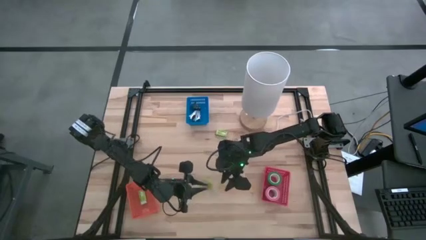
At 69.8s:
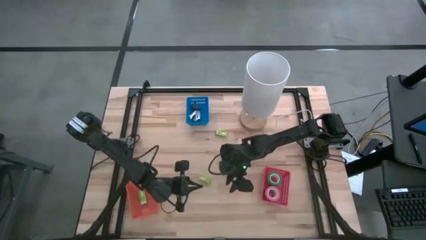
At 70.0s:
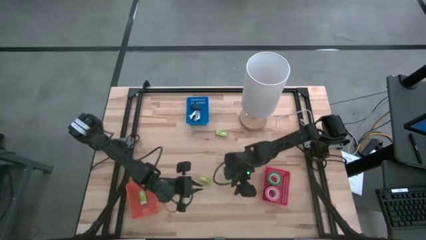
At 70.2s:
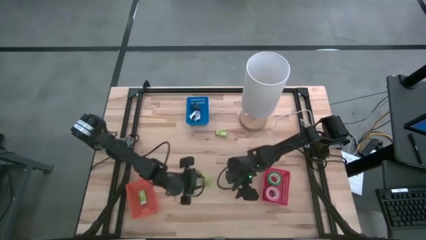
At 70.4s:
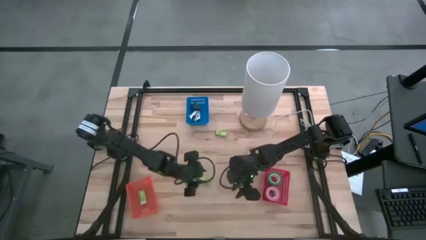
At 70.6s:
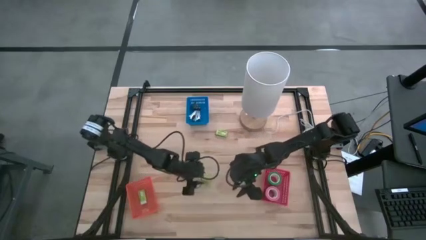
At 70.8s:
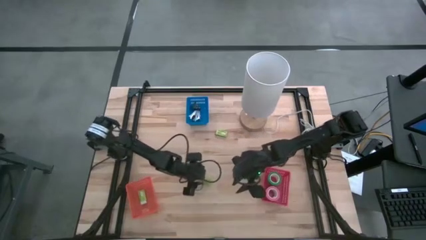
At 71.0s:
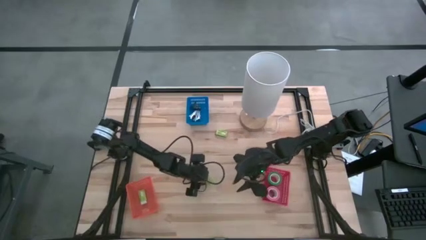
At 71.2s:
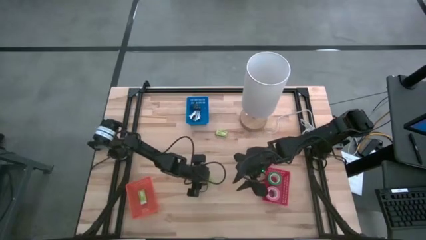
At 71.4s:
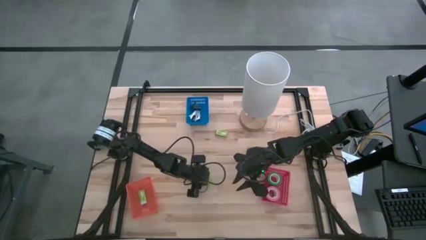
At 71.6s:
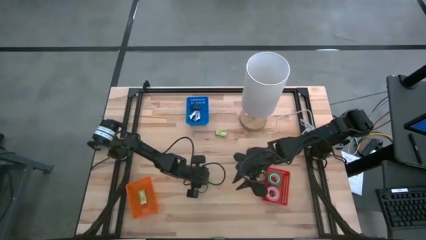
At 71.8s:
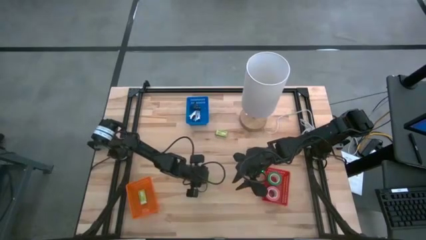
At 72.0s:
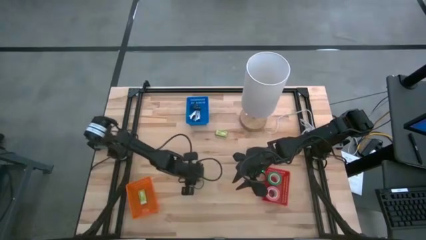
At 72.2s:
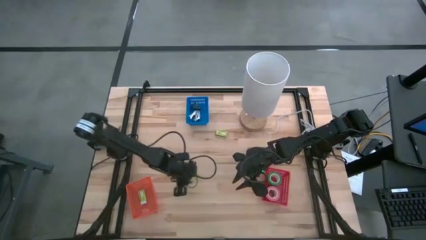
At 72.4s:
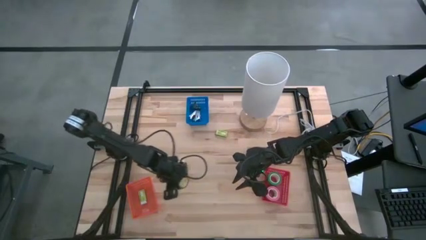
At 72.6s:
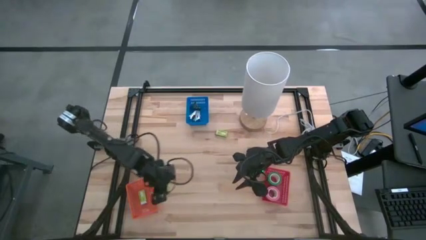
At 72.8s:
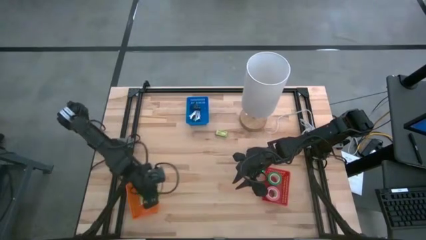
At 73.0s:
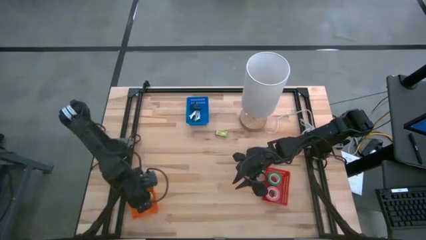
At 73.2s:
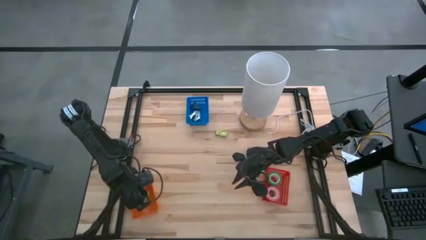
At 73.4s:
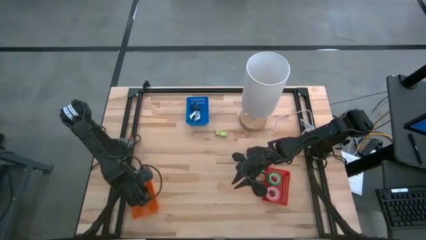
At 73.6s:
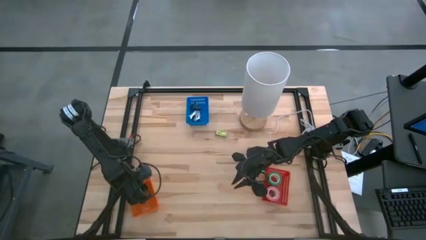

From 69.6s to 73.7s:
Task: Pick and place Stapler, Stapler remover, tape
Put the bottom green staple box into the orange bin

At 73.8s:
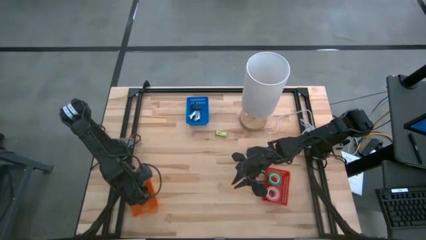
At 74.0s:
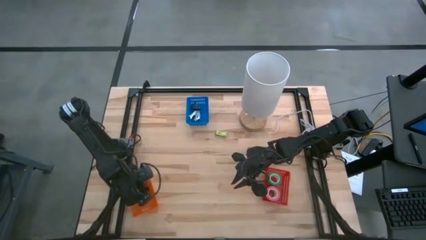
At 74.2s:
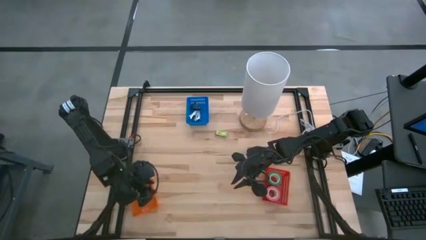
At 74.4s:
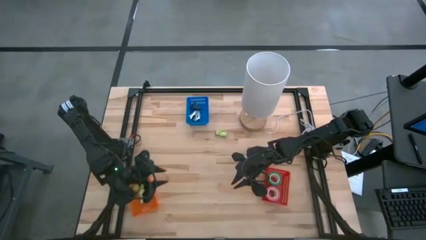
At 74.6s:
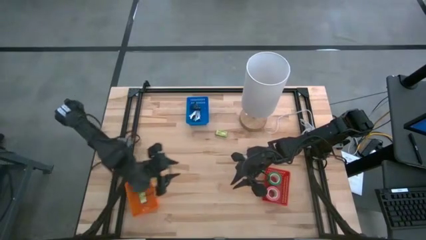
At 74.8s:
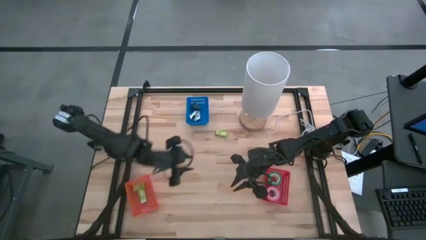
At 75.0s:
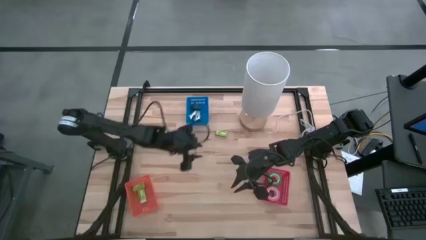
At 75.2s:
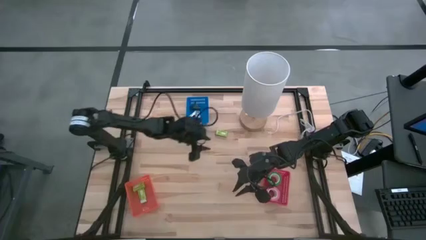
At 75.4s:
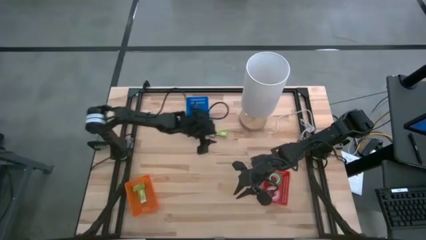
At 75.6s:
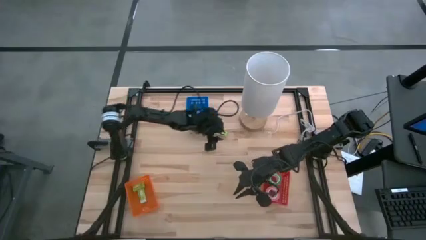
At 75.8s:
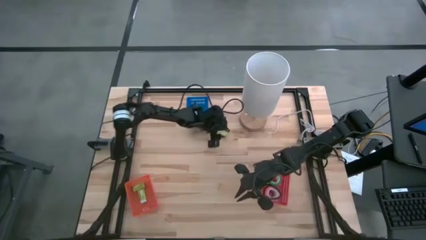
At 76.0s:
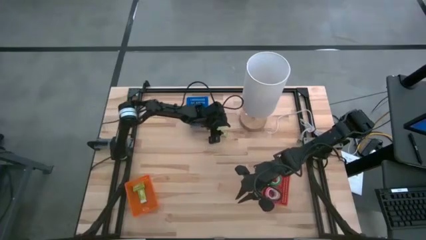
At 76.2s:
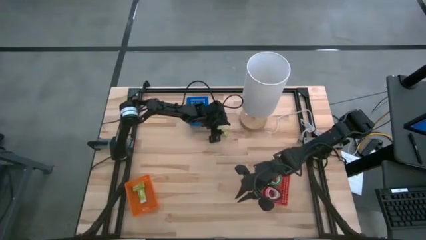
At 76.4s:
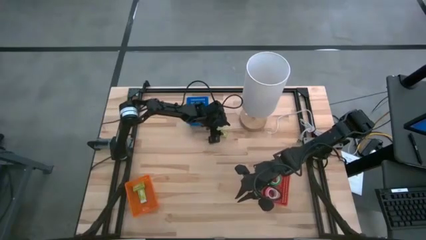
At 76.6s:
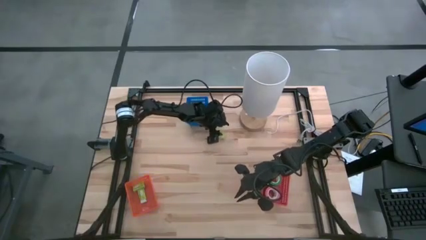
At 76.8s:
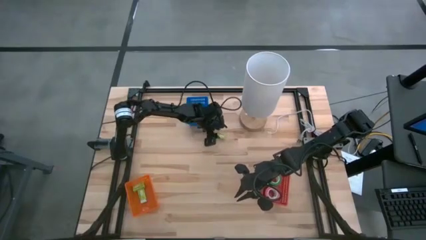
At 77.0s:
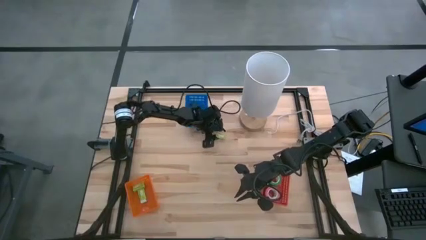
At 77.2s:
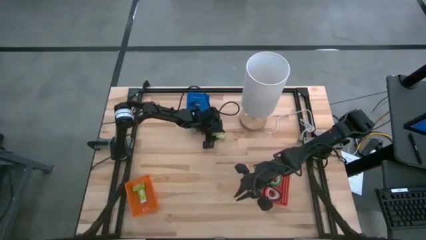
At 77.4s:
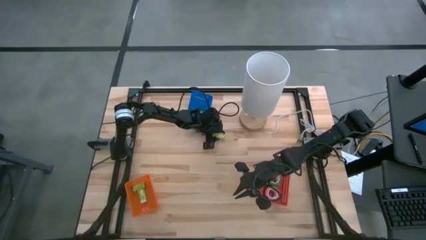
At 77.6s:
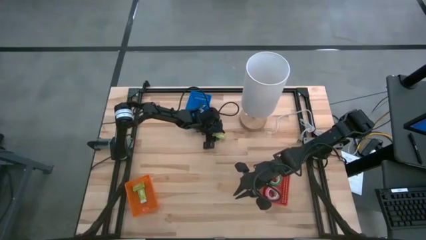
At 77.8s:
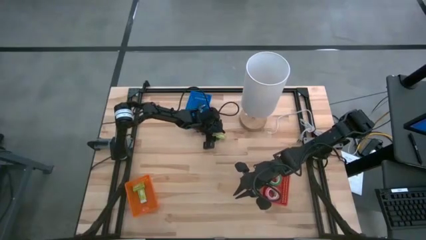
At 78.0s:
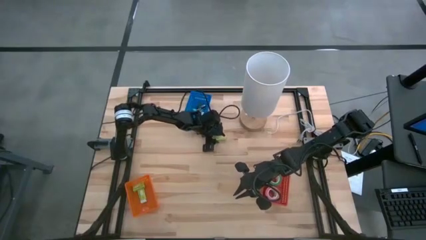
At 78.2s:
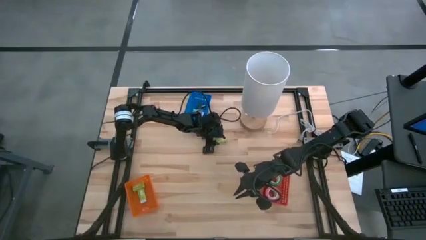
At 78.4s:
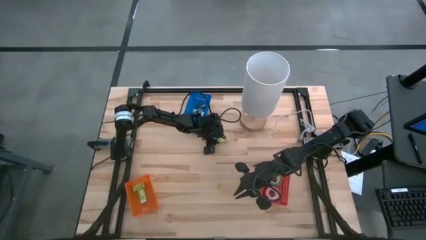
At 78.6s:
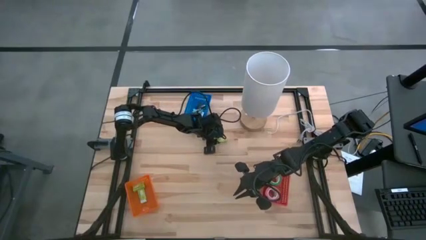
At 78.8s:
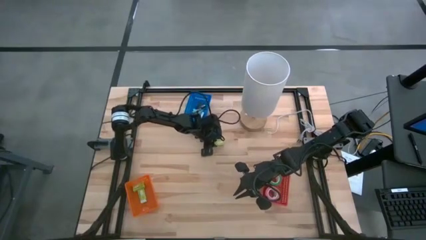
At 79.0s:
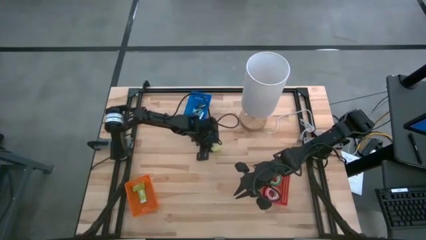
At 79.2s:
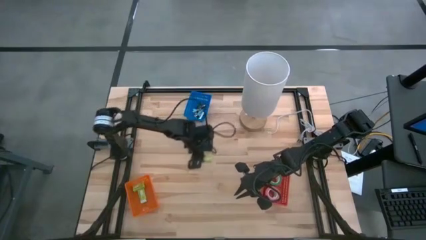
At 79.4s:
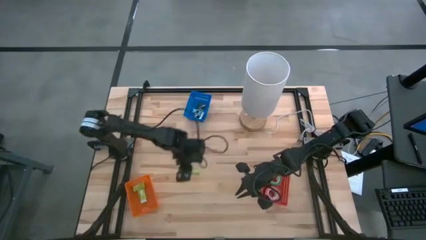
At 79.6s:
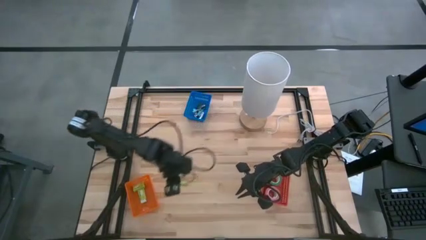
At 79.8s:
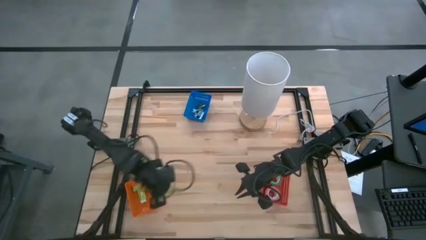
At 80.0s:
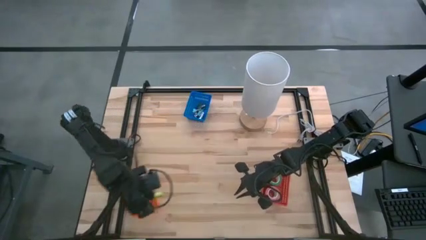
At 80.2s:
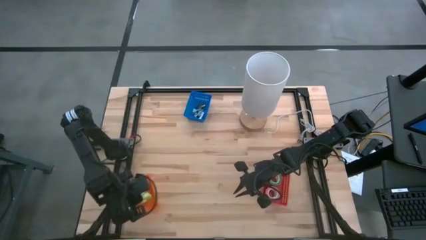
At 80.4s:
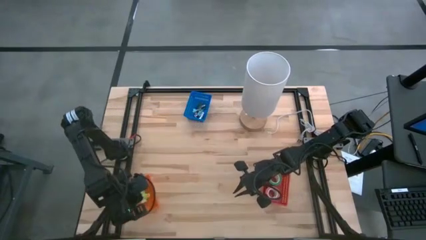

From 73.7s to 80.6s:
Put the green staple box into the orange bin

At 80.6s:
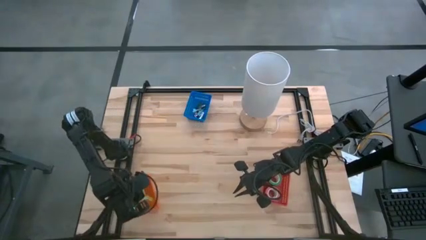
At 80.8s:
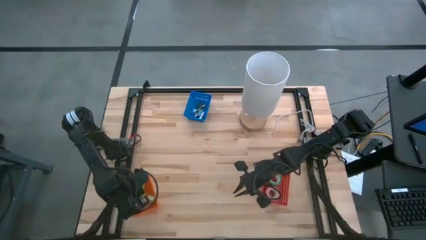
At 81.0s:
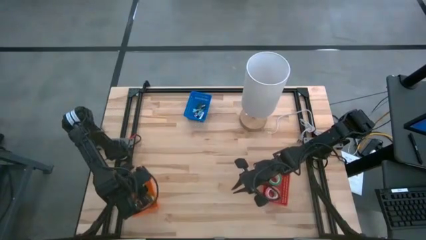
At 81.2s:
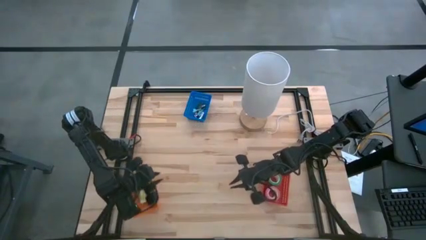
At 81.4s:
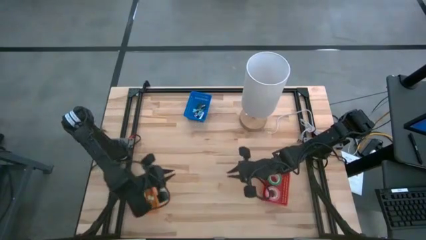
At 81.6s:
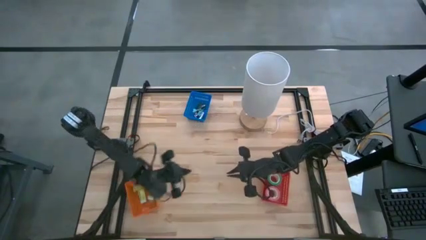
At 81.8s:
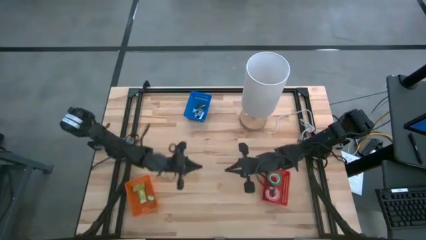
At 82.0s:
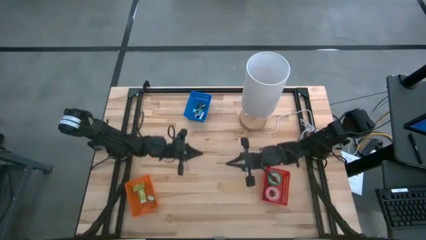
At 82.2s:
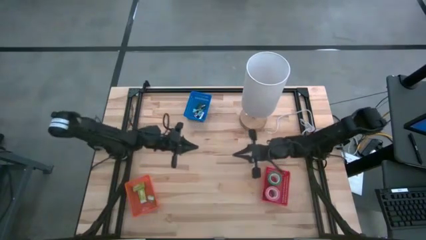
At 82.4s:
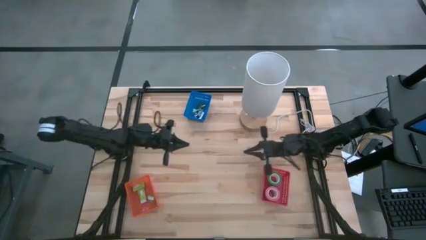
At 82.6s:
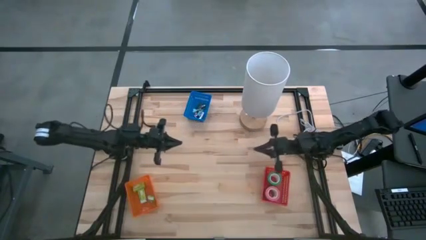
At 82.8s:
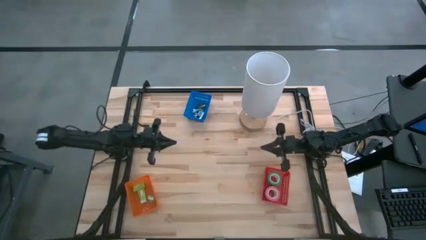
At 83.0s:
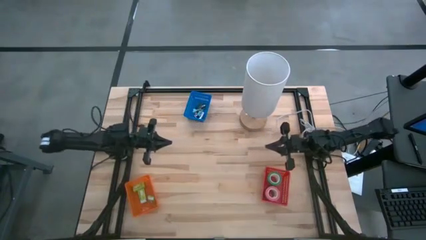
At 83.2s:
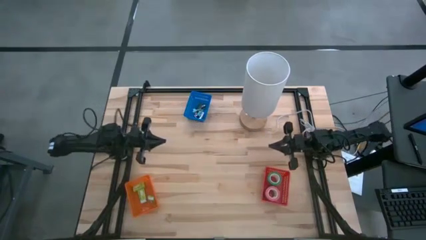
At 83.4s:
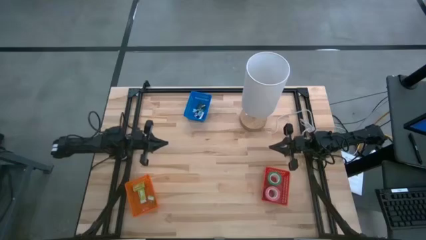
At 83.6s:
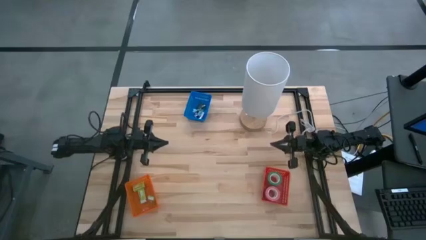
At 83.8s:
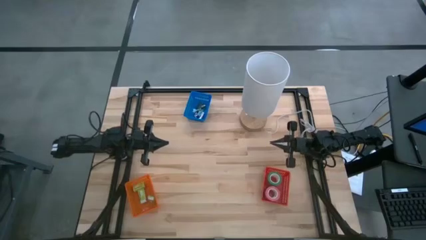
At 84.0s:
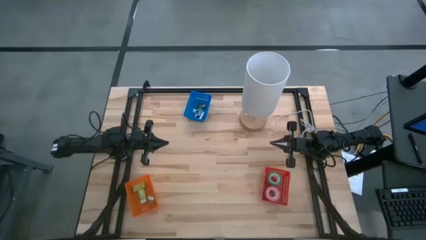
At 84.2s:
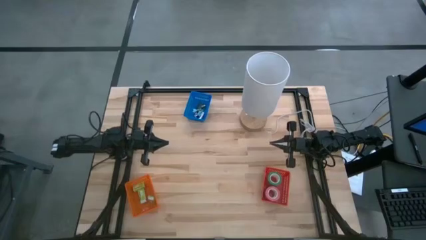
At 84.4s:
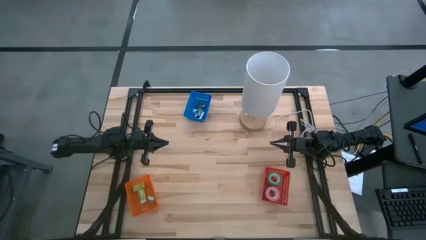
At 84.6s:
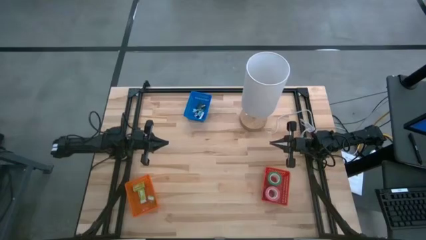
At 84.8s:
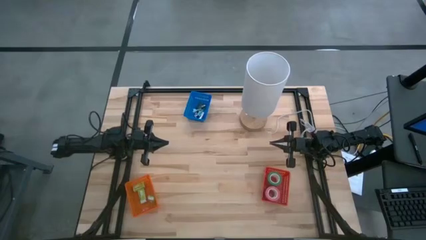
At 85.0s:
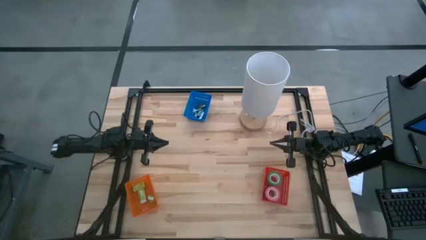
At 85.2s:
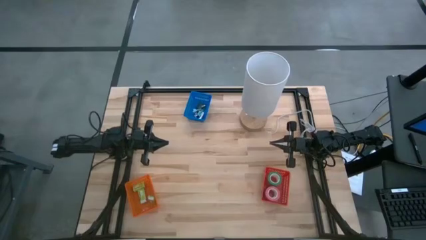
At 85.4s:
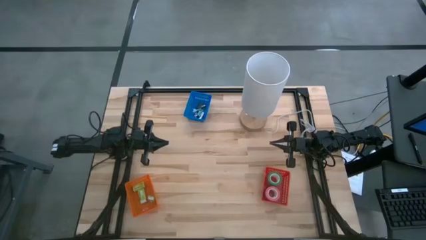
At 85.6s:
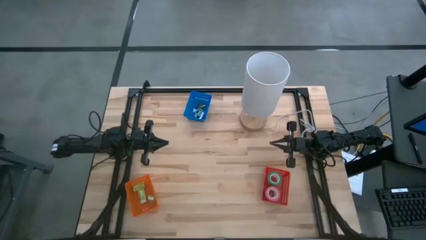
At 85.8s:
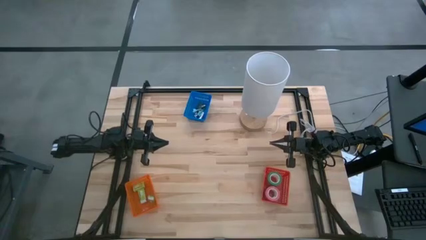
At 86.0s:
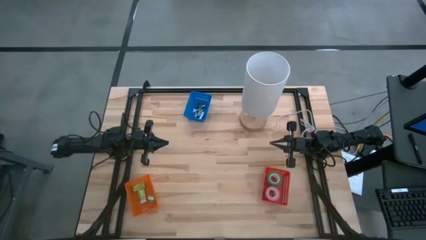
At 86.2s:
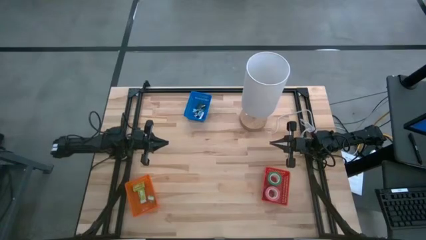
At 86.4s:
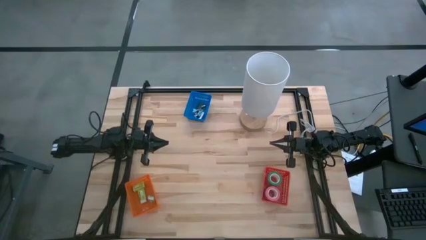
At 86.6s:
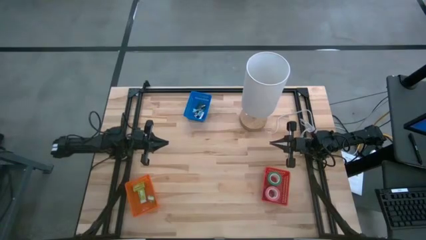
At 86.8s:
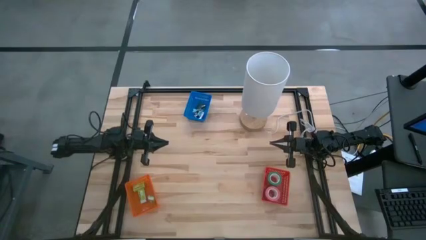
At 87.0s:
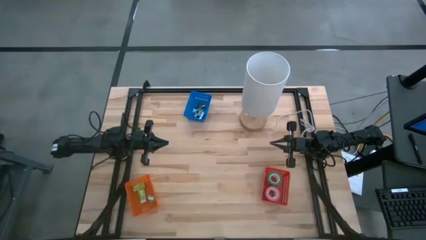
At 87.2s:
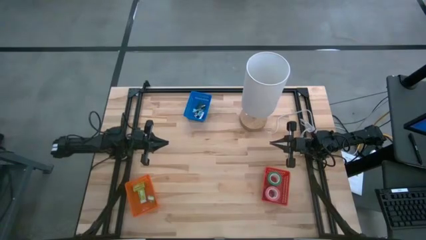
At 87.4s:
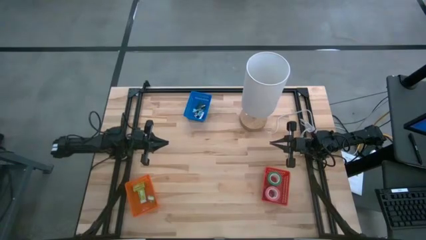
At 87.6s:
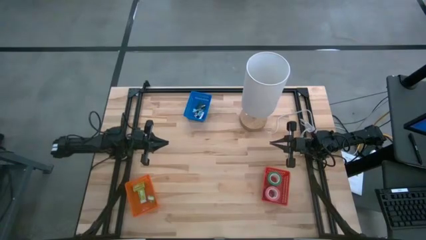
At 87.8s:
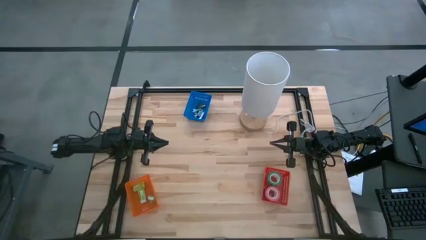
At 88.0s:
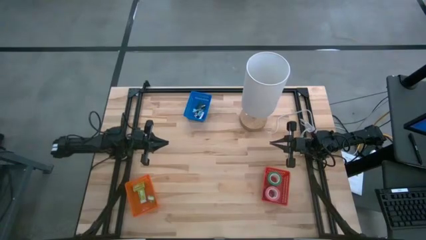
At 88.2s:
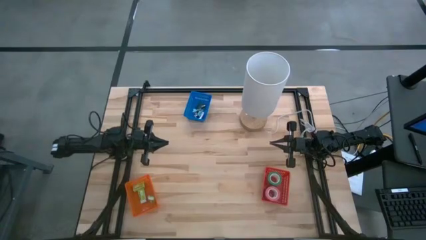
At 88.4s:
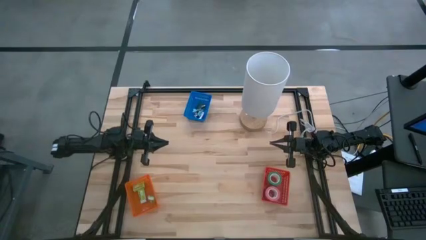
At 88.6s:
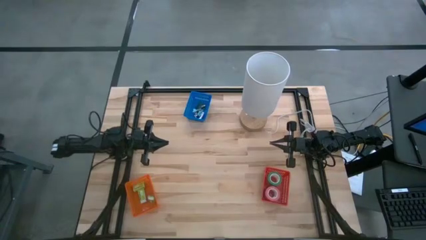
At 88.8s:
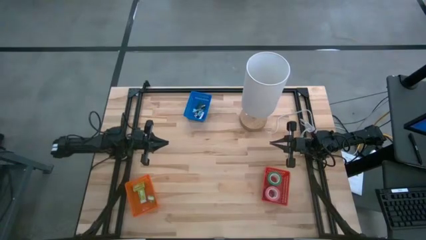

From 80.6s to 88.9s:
Return to Home Position
